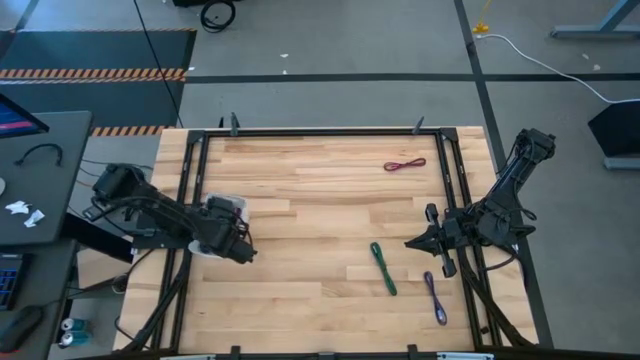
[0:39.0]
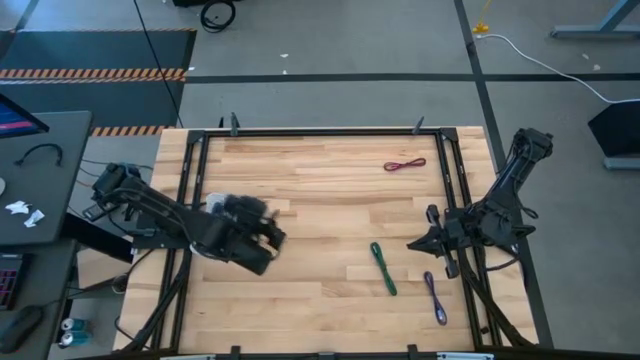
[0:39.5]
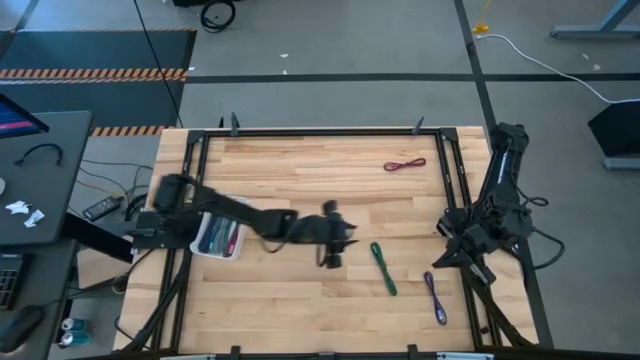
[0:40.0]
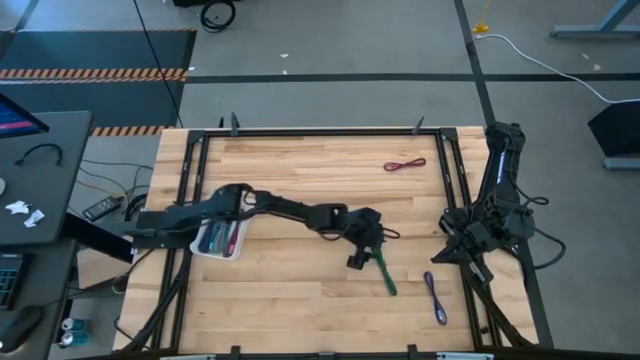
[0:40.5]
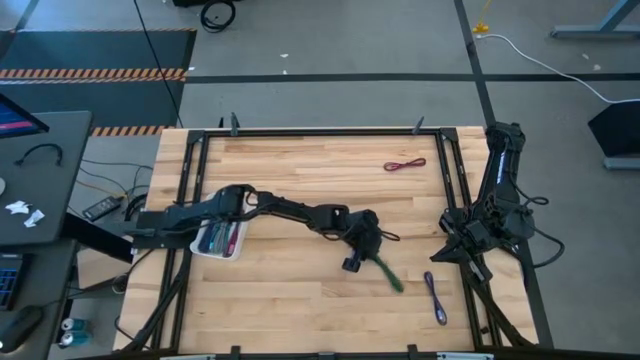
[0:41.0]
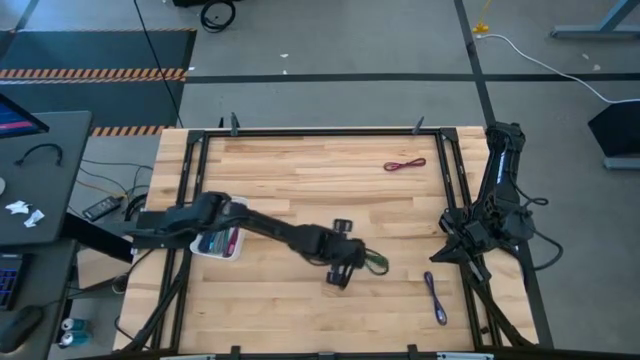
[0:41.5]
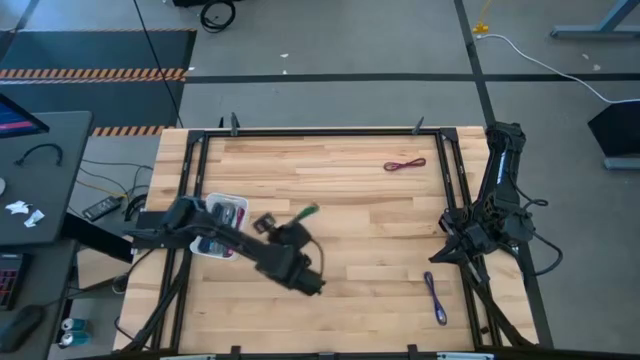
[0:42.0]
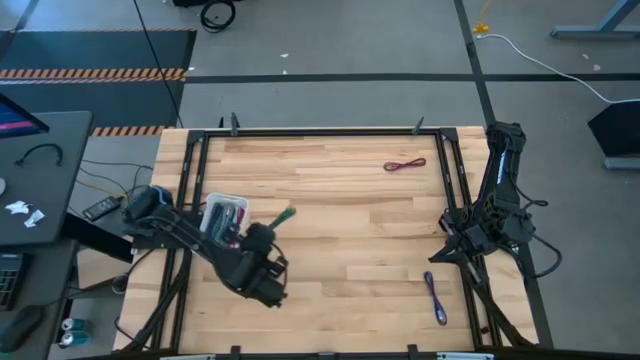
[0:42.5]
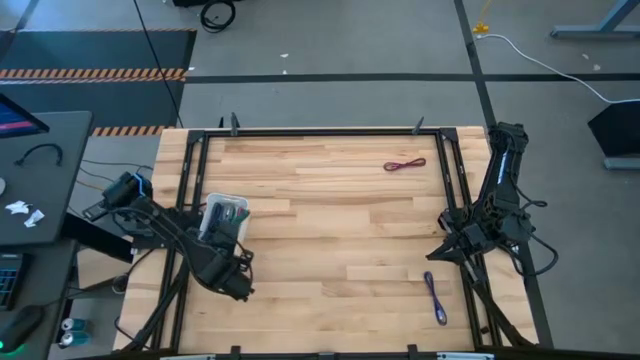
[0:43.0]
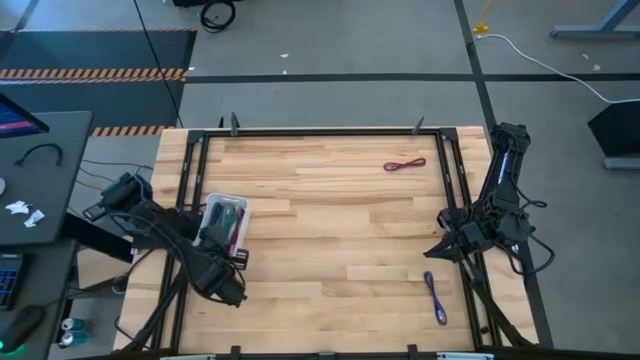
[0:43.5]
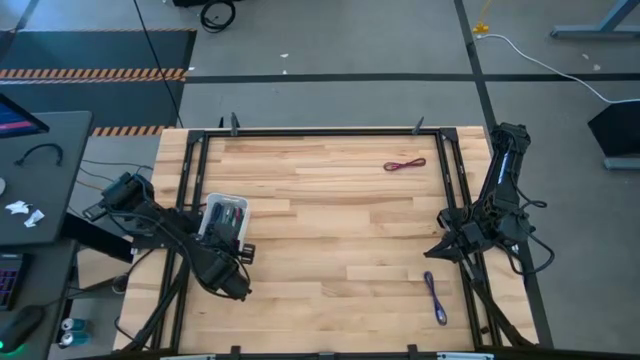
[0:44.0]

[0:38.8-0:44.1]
Task: Pick and place USB-C Cables
Put the green charger cable into the white bin

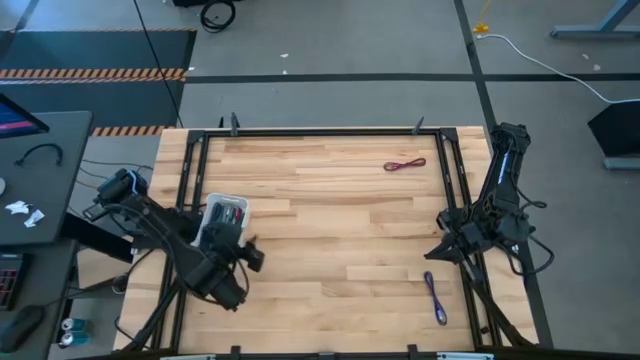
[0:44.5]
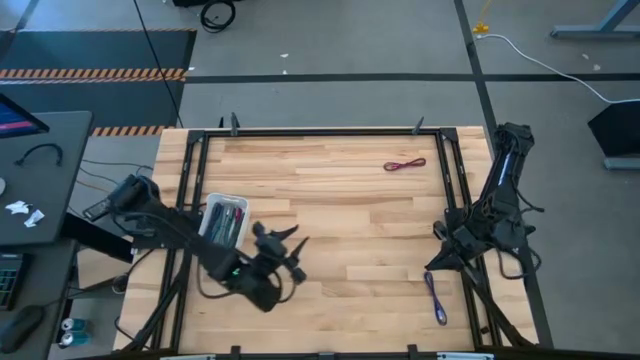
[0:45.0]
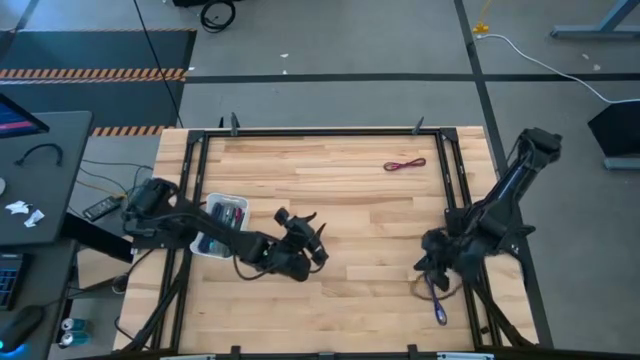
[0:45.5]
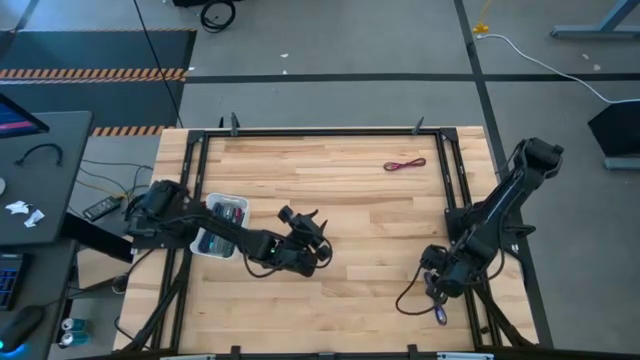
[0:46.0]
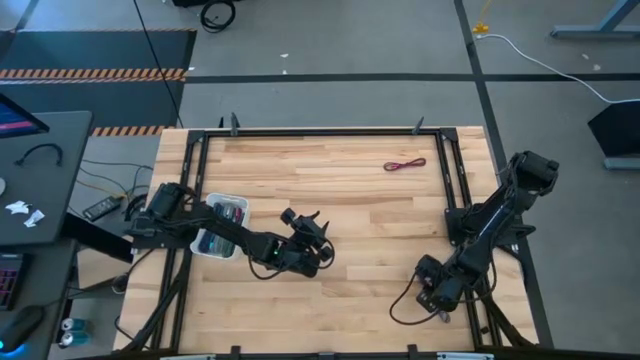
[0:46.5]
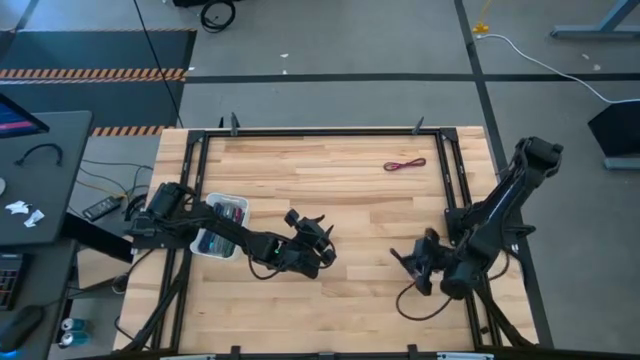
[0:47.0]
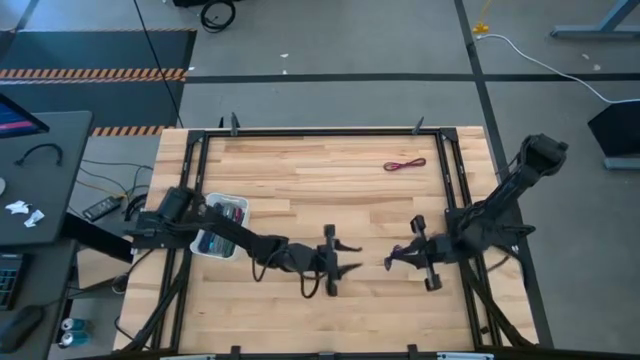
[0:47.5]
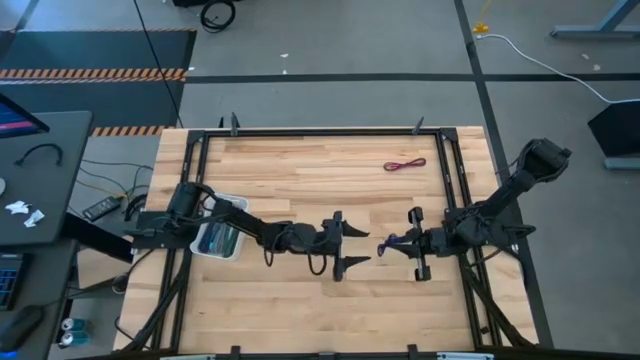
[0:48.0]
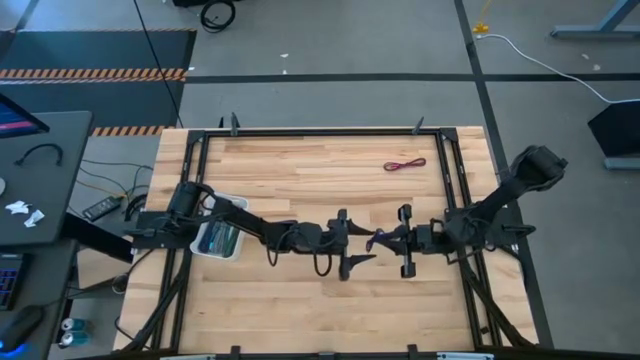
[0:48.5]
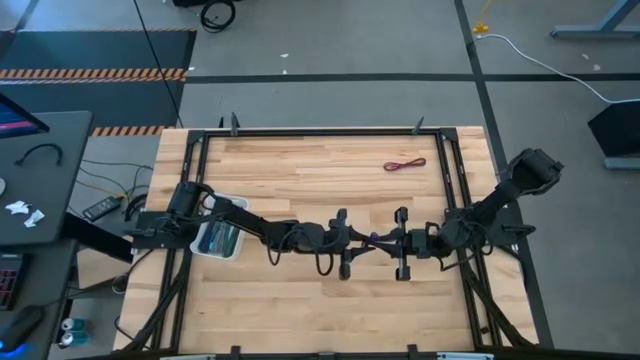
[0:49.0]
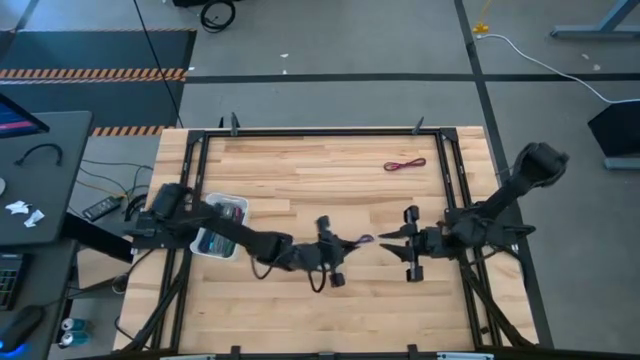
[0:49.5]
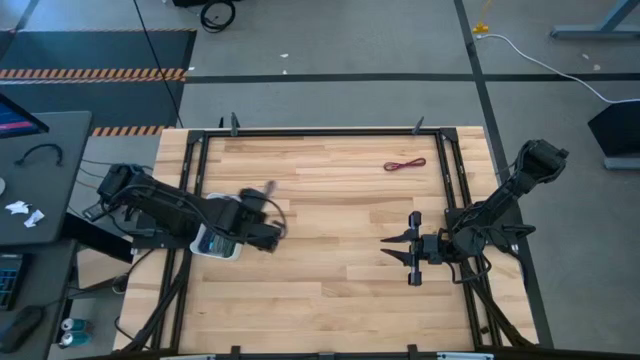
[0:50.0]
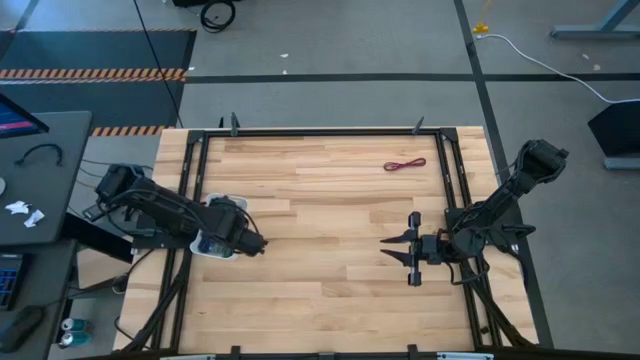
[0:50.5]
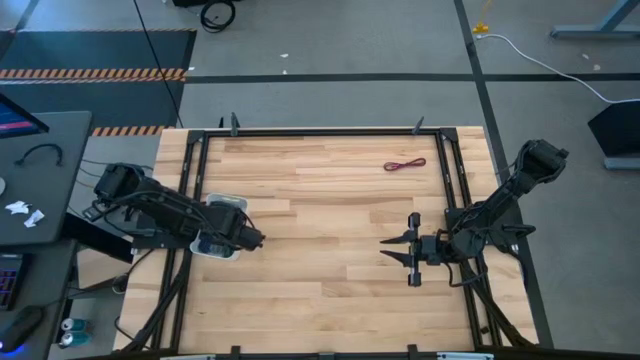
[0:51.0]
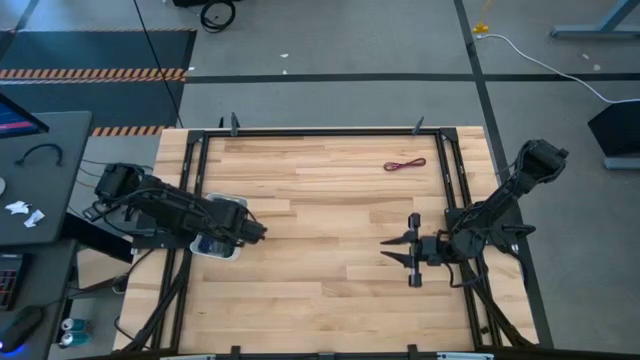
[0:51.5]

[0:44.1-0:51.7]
Put the violet charger cable into the white bin

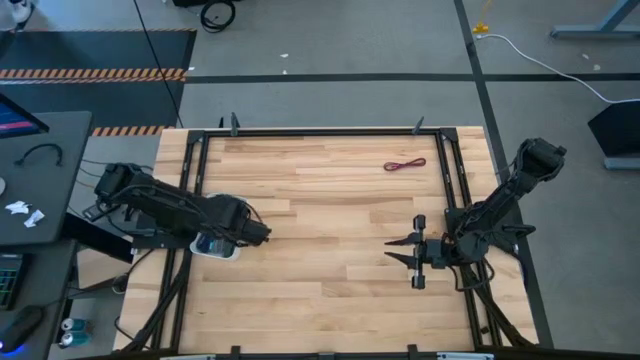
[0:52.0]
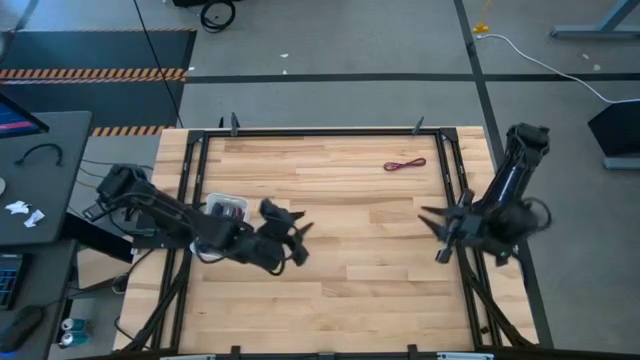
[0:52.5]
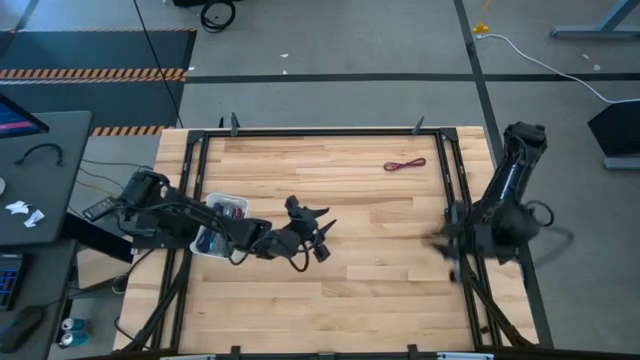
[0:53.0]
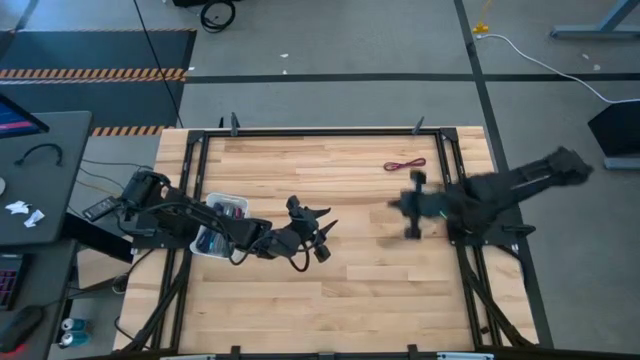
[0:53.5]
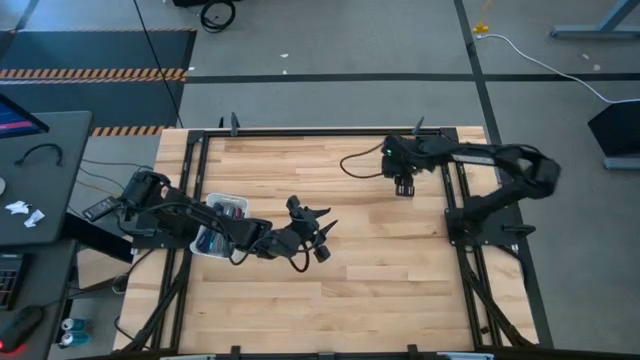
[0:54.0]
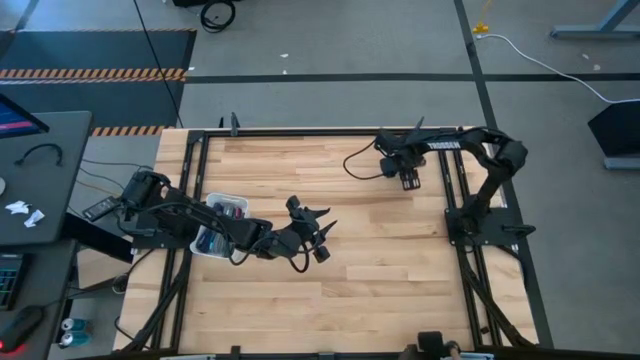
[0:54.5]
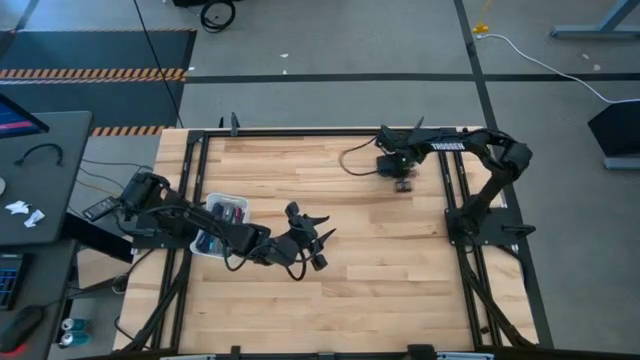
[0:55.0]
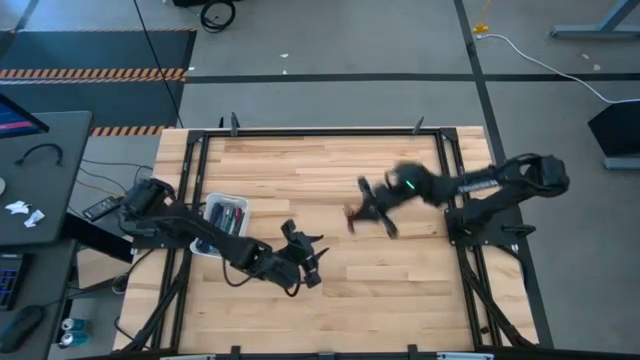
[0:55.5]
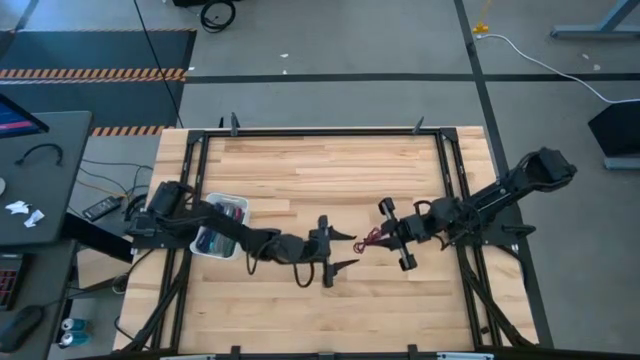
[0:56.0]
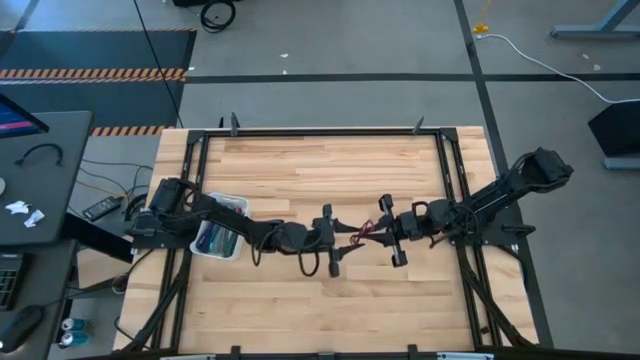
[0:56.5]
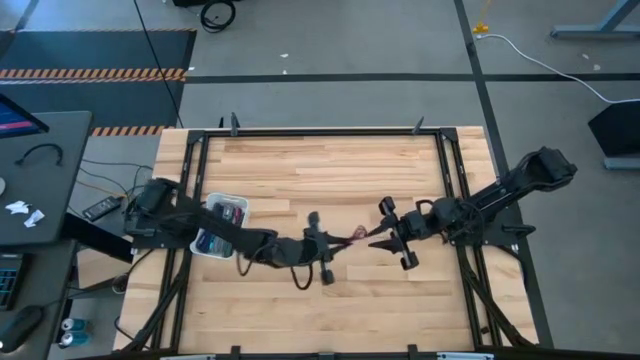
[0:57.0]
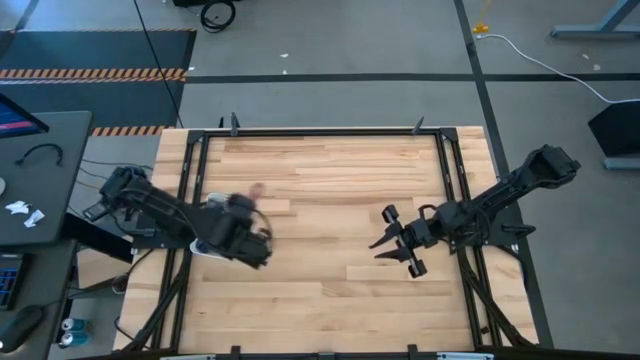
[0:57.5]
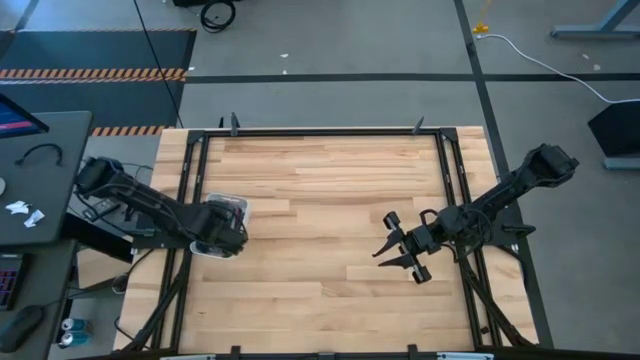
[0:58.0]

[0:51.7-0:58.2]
Put the pink charger cable into the white bin

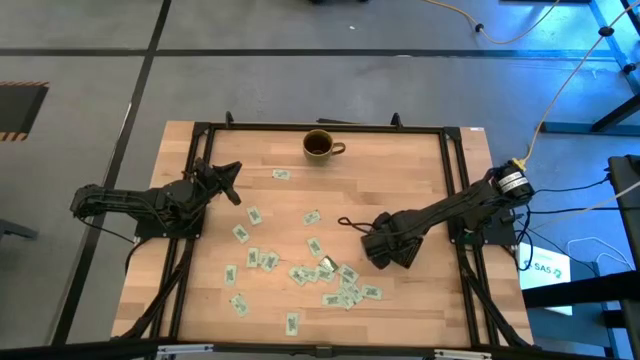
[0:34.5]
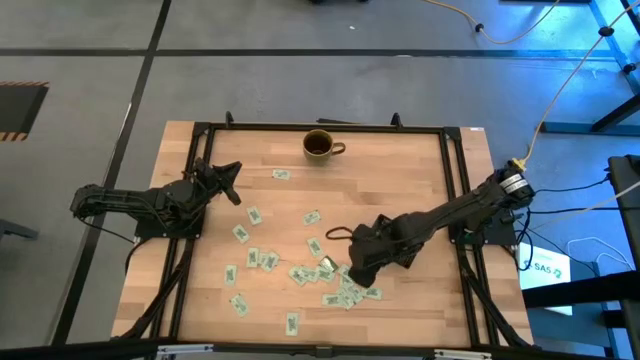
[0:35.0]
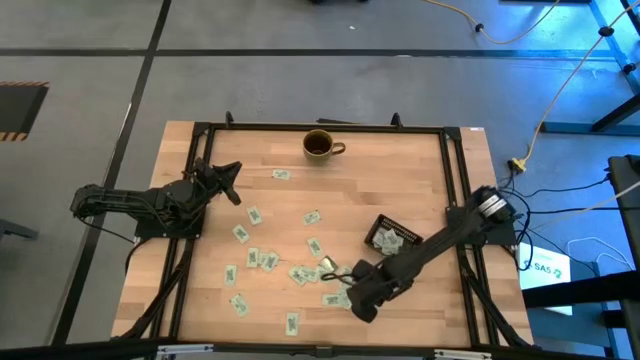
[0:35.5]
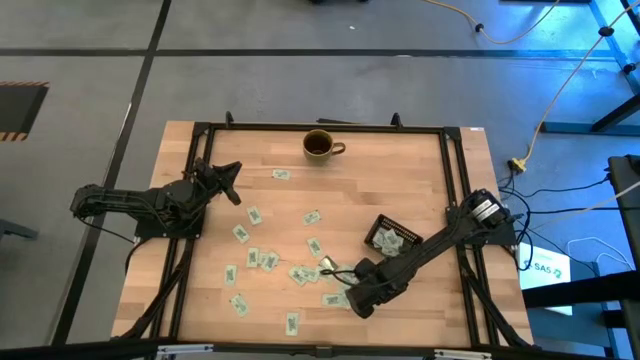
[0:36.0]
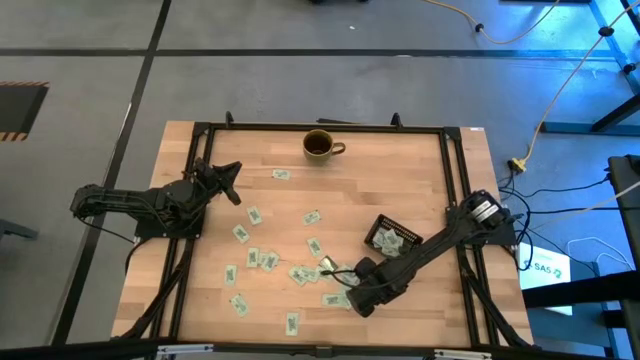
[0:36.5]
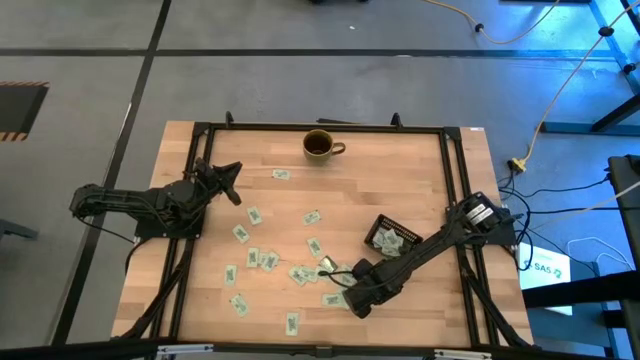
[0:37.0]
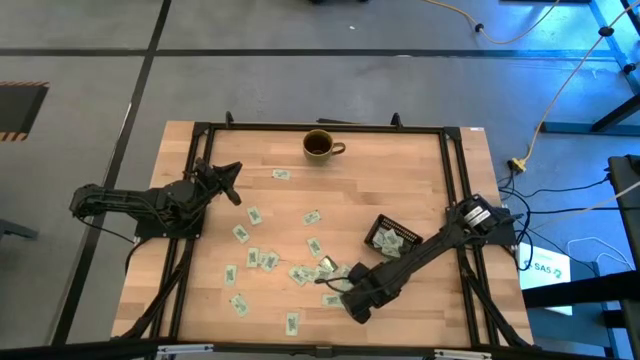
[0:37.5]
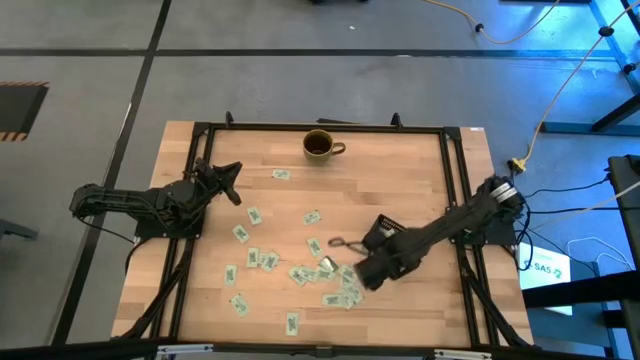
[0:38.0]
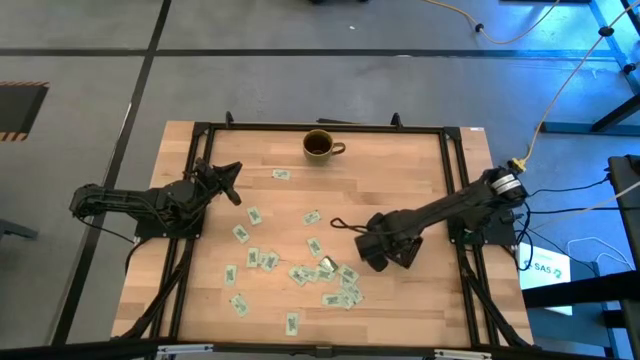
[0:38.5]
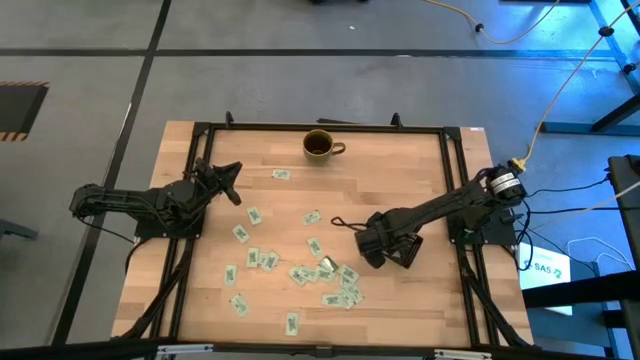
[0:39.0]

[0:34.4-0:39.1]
Task: Pick and place Stevia / Truvia into bins
Put the stevia packet into the black bin
